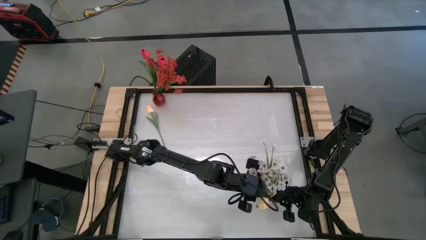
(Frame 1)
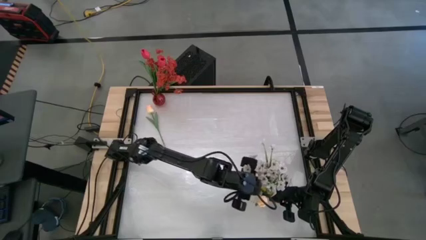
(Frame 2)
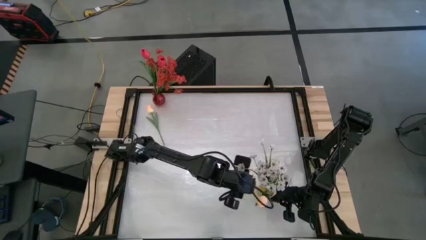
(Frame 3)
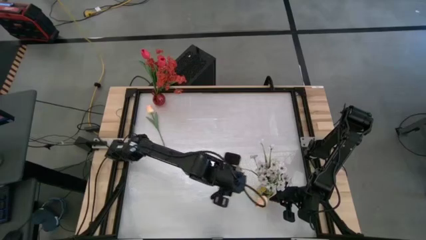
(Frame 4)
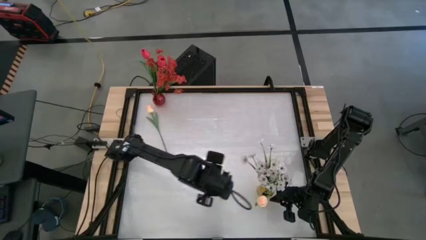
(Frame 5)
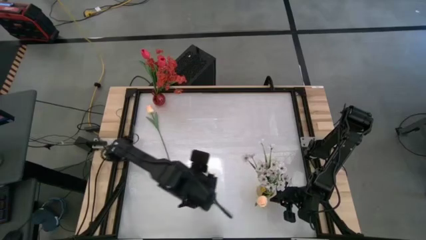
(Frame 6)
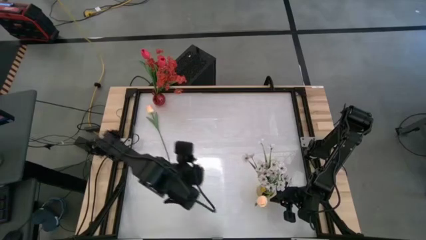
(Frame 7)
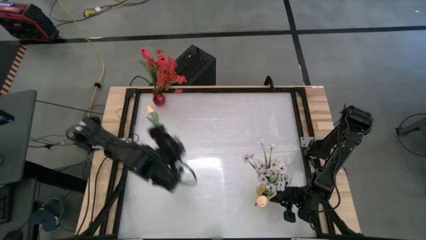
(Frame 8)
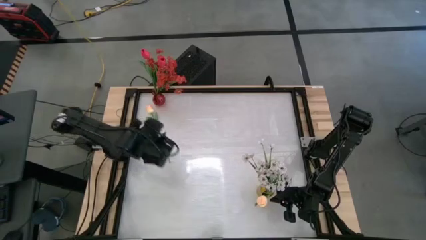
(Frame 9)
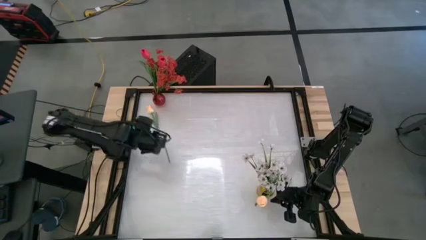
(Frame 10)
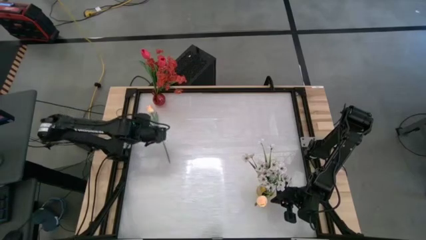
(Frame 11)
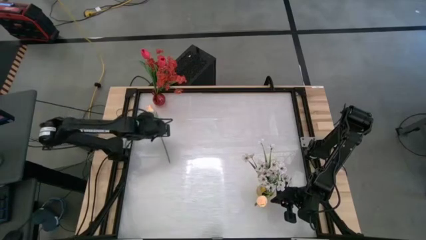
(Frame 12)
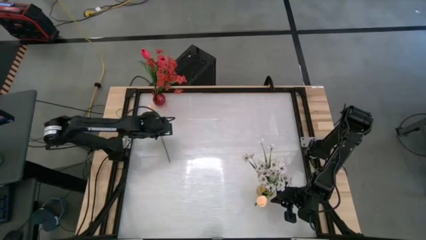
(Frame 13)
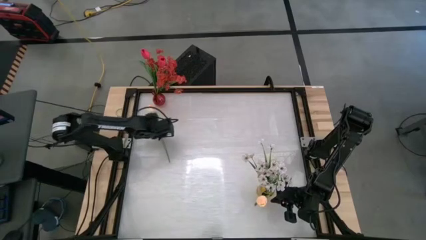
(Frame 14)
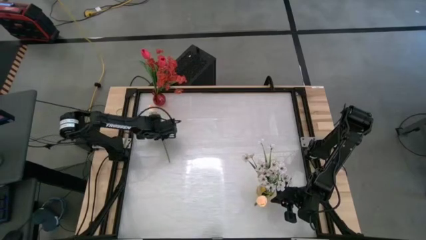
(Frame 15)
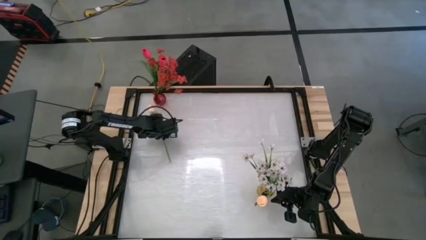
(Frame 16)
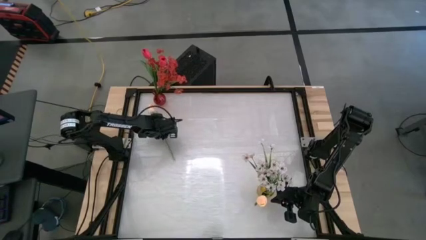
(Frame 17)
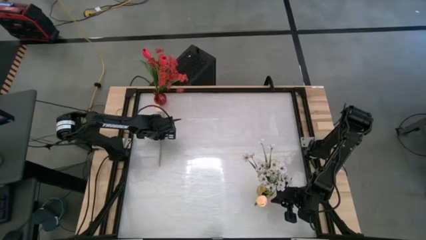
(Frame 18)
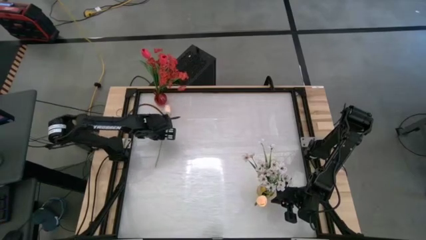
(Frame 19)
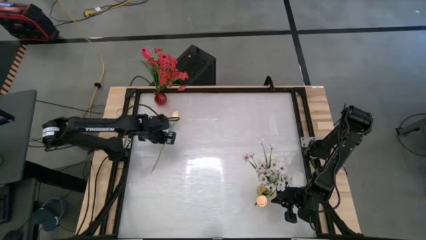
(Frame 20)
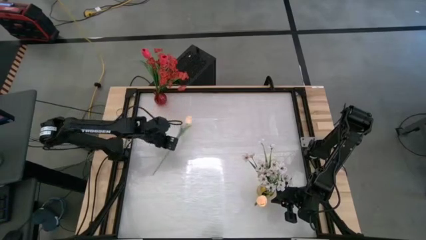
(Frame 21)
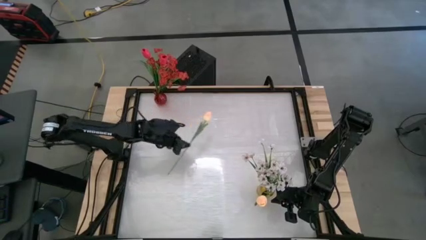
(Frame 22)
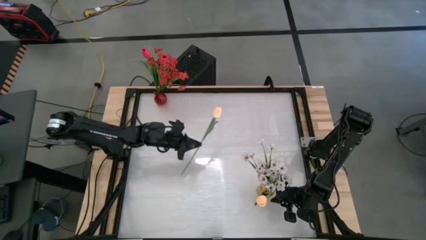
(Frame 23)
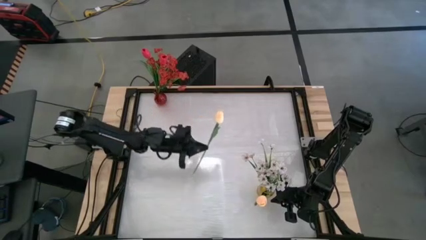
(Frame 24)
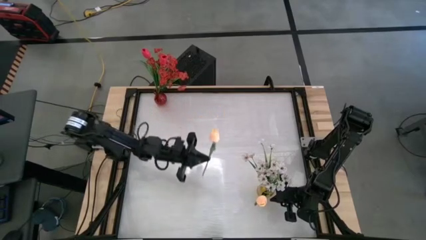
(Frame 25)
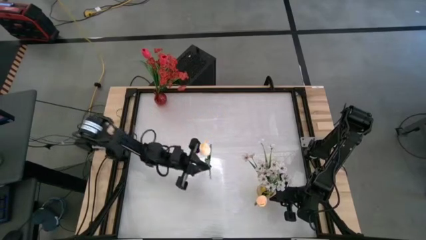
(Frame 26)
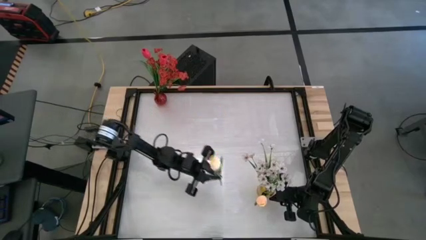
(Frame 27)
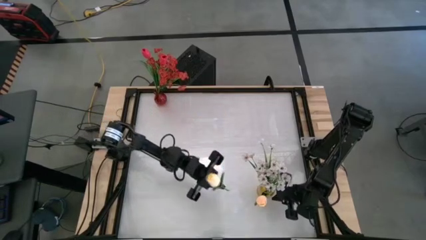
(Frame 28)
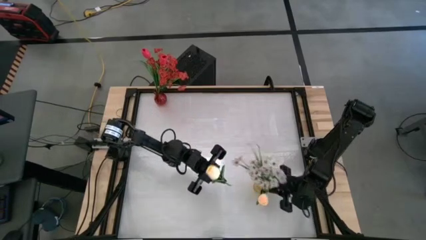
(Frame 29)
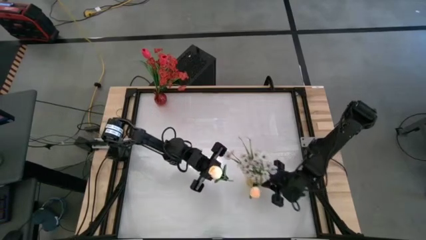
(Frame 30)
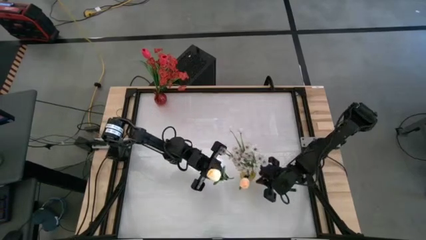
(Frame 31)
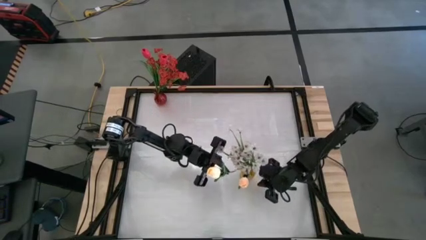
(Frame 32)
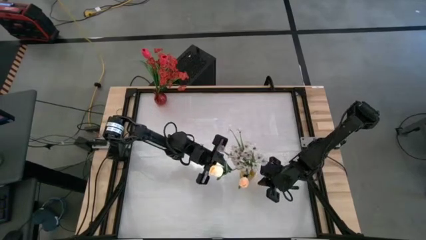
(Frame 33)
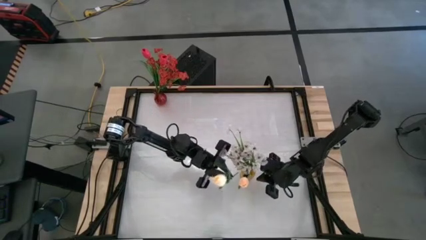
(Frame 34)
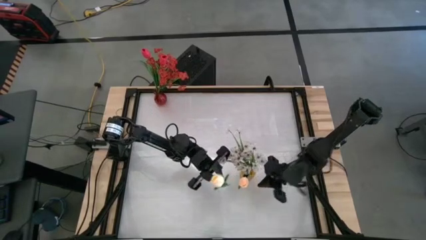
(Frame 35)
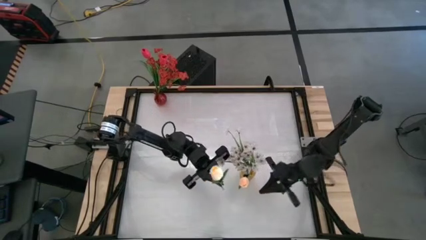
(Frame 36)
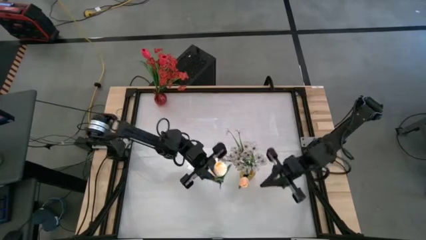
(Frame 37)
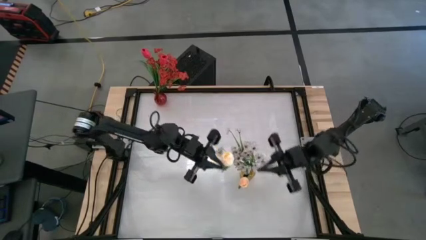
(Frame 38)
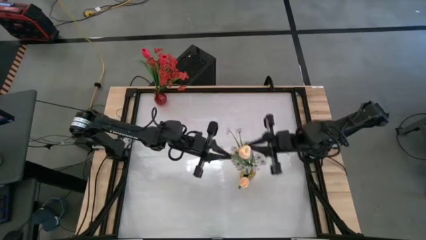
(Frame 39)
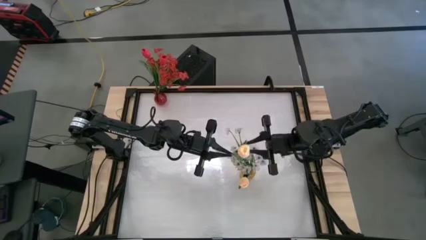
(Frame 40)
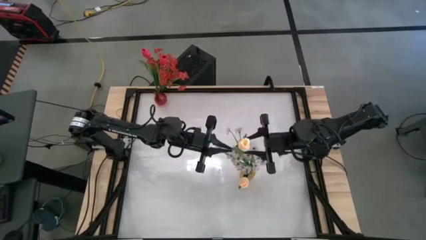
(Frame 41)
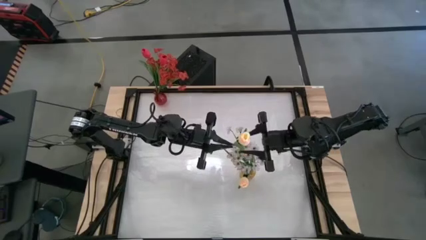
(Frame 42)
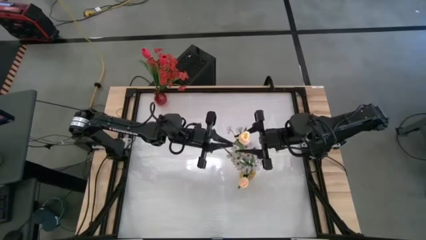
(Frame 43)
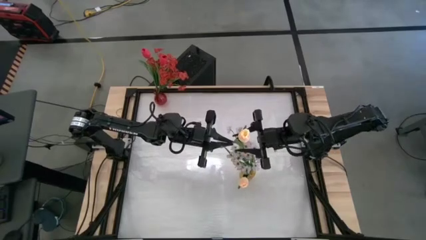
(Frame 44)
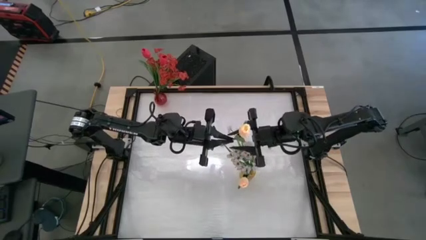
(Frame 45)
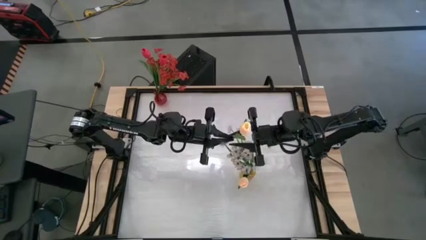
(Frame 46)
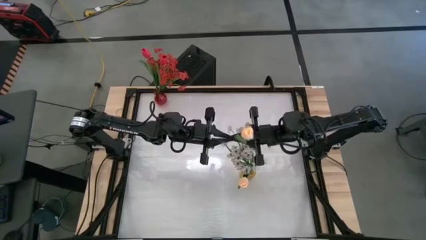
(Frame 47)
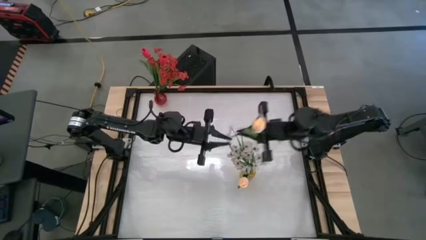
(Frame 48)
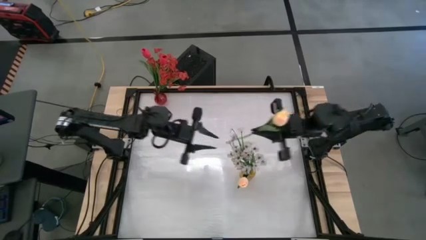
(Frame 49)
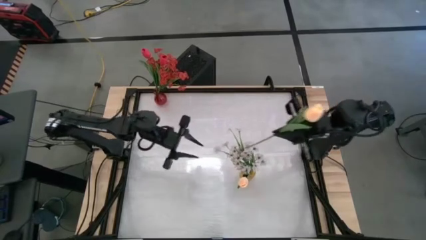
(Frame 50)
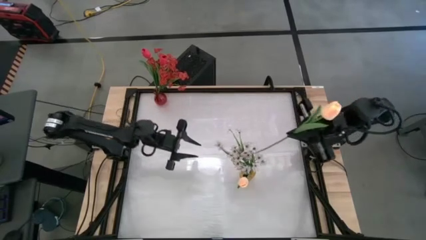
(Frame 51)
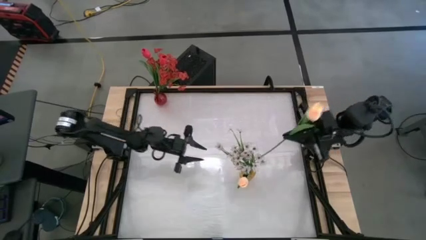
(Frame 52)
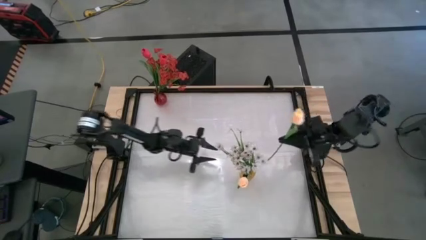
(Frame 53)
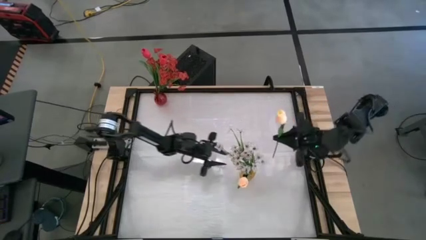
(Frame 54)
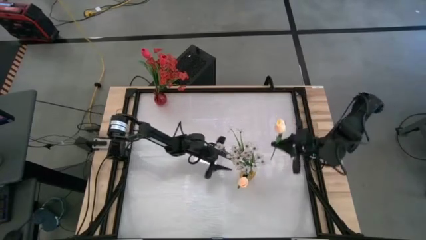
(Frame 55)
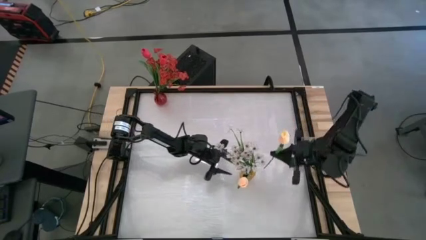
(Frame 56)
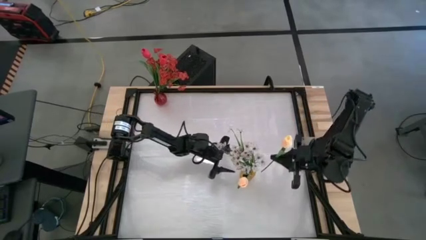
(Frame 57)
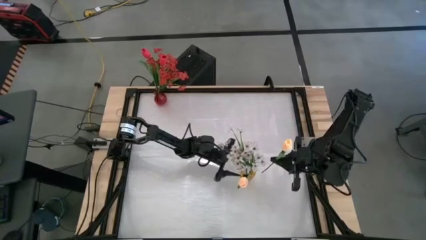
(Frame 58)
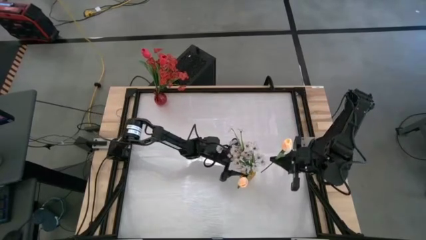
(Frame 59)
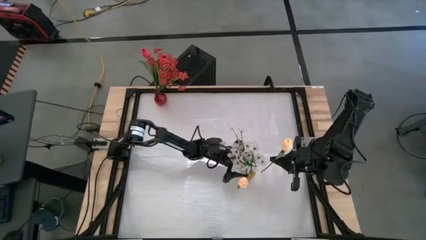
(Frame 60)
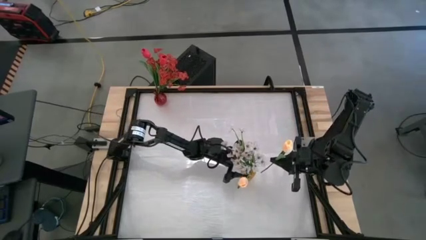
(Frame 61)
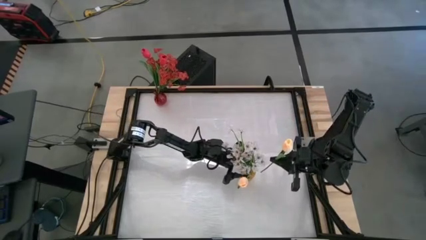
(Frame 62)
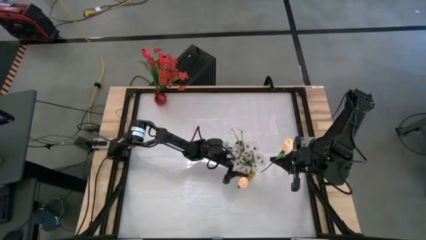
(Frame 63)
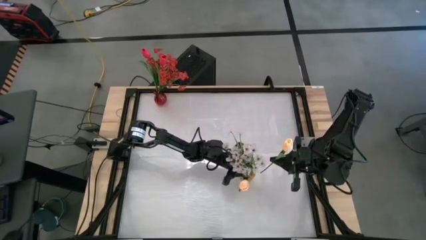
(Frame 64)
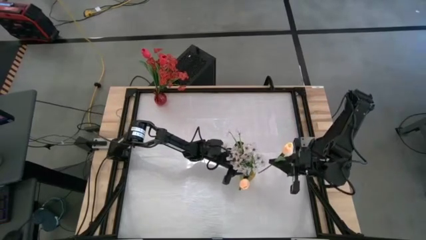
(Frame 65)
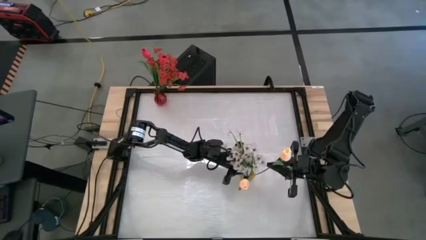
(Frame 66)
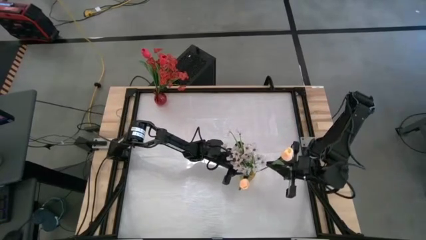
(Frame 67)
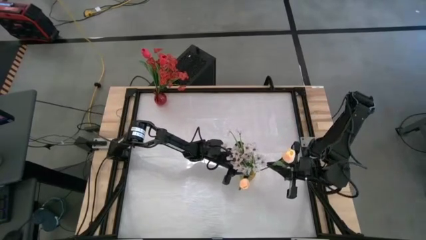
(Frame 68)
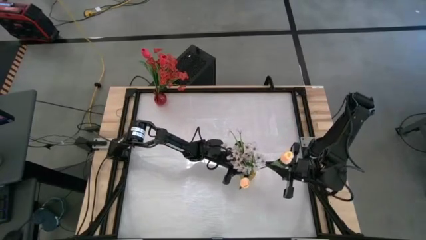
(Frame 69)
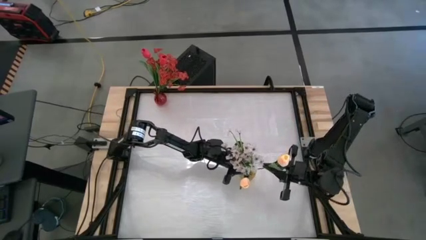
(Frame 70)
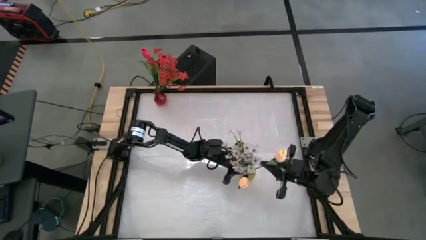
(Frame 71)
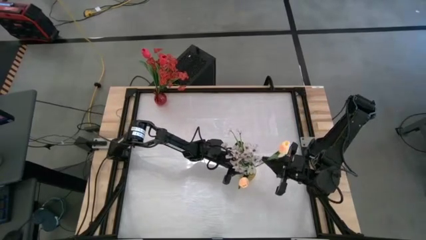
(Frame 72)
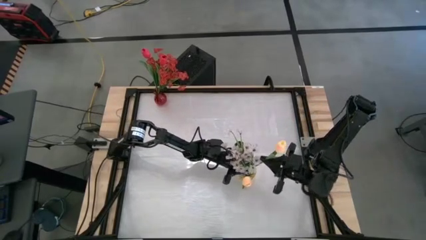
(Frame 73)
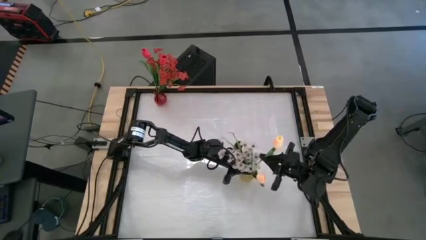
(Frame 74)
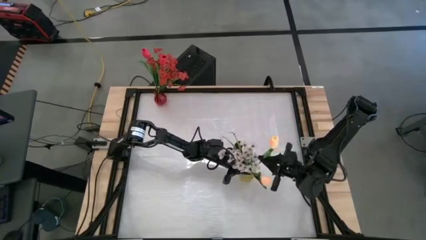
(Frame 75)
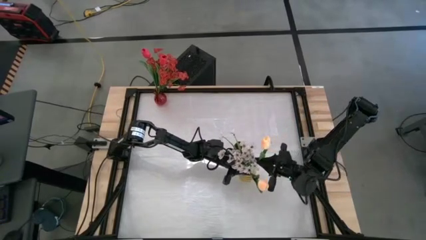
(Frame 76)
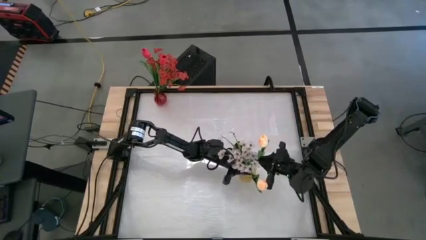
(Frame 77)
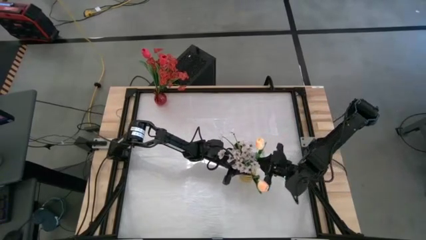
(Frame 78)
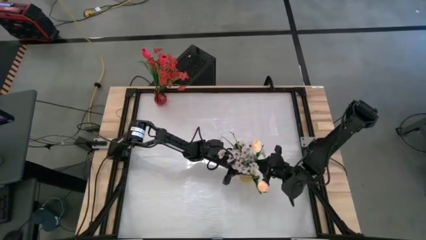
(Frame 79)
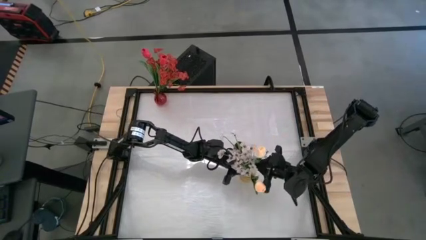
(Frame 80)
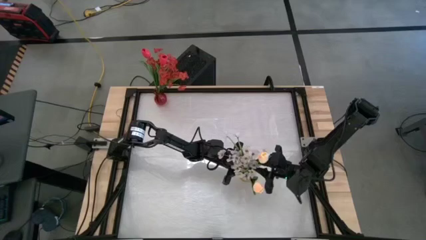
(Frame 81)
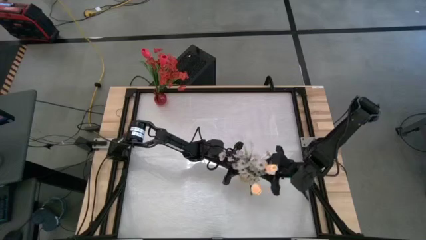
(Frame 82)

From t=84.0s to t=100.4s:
Task: Sort flowers into vase by color
Put the white flower into the transparent yellow vase
